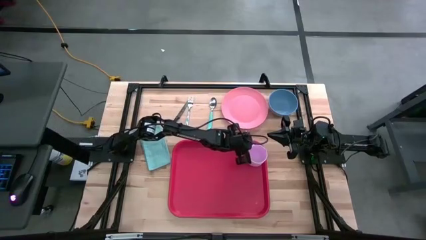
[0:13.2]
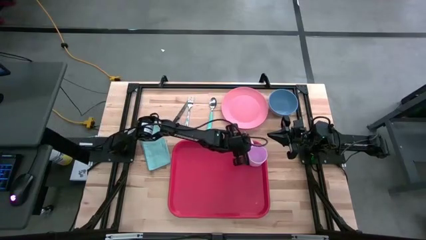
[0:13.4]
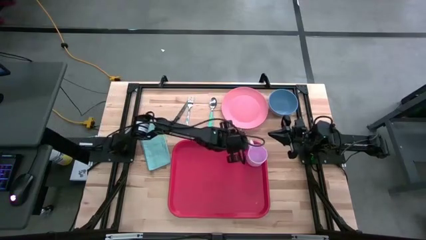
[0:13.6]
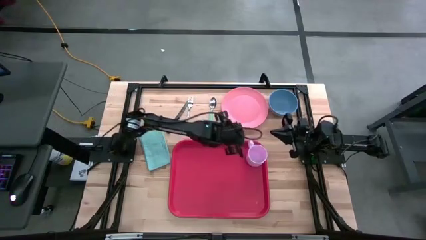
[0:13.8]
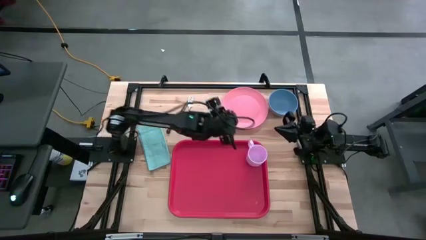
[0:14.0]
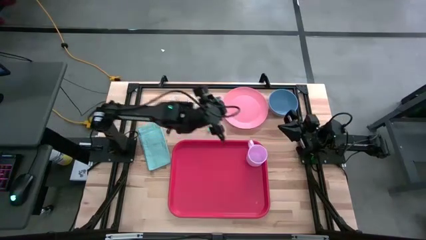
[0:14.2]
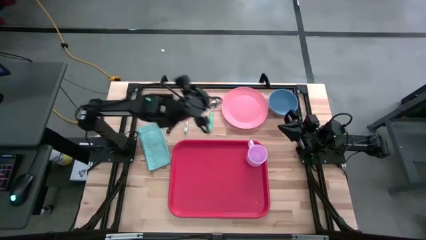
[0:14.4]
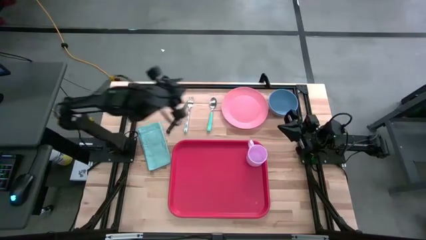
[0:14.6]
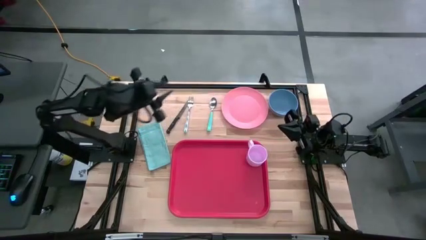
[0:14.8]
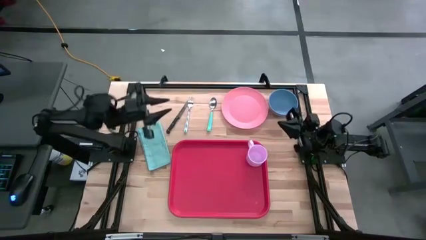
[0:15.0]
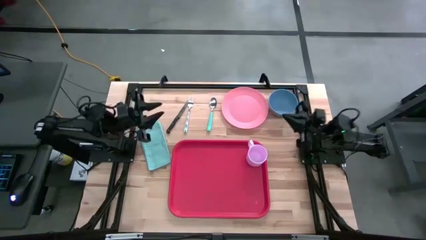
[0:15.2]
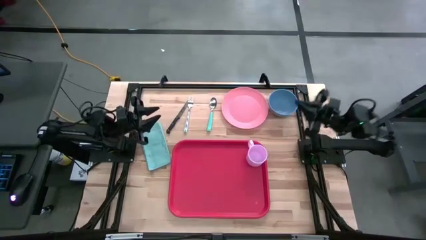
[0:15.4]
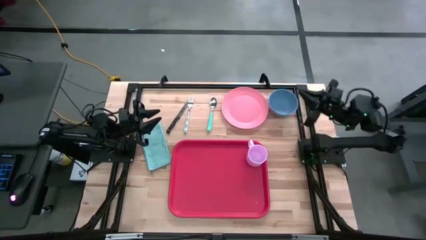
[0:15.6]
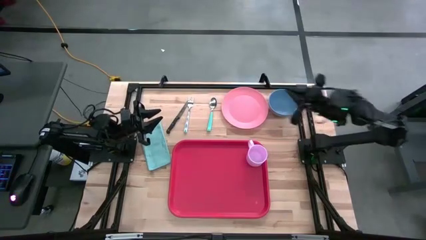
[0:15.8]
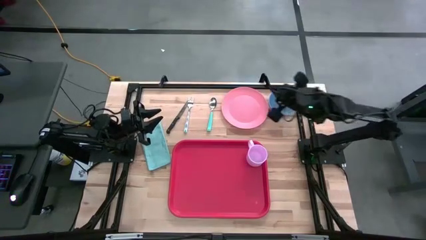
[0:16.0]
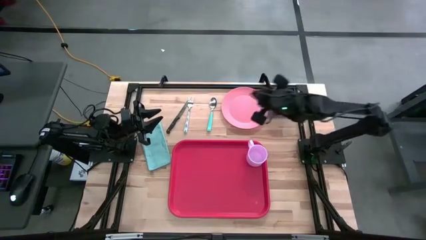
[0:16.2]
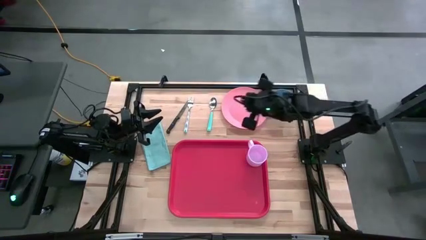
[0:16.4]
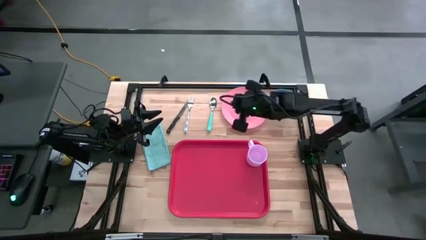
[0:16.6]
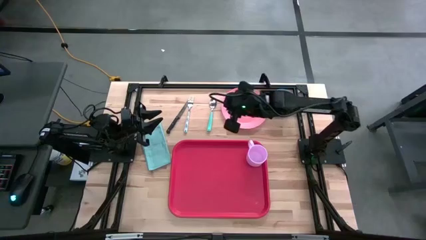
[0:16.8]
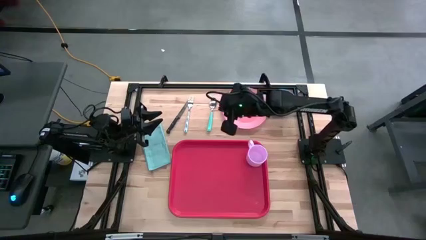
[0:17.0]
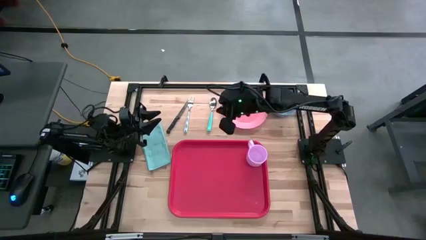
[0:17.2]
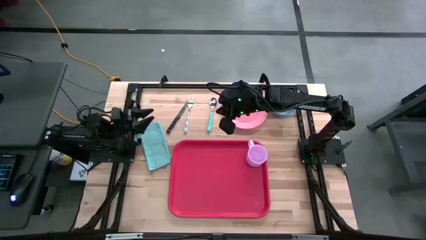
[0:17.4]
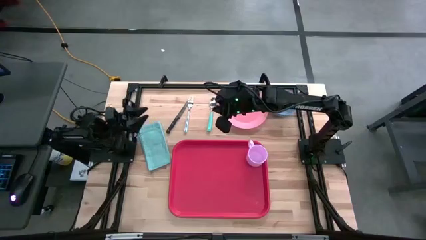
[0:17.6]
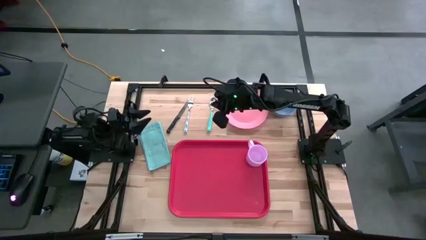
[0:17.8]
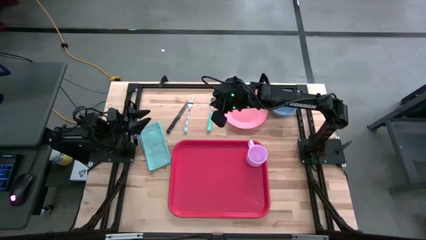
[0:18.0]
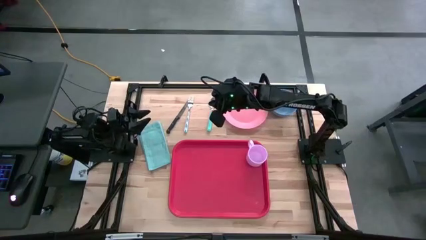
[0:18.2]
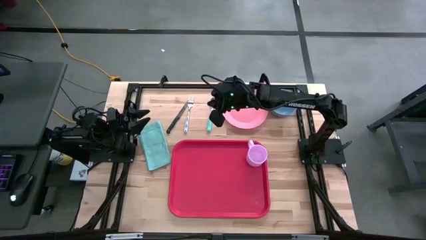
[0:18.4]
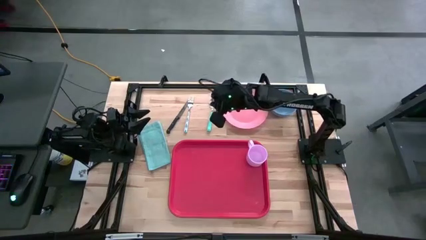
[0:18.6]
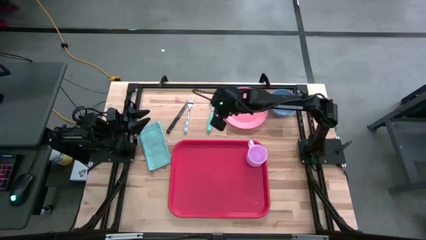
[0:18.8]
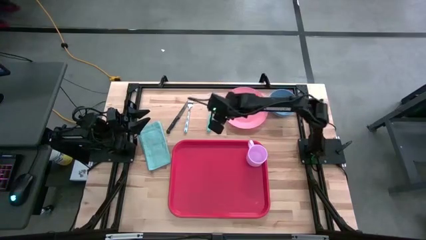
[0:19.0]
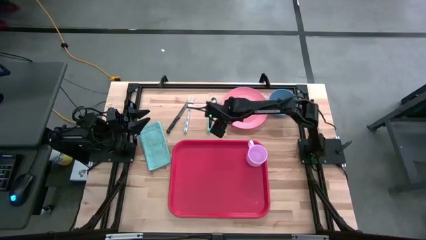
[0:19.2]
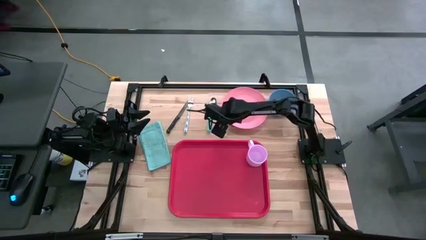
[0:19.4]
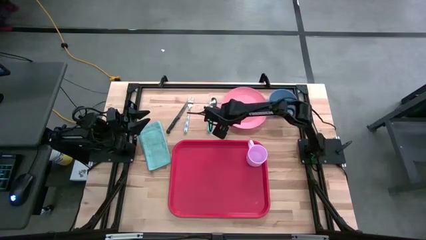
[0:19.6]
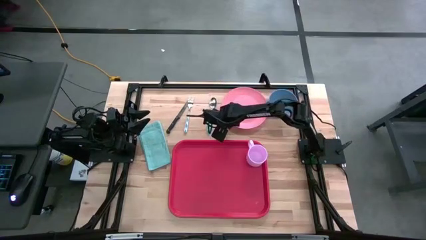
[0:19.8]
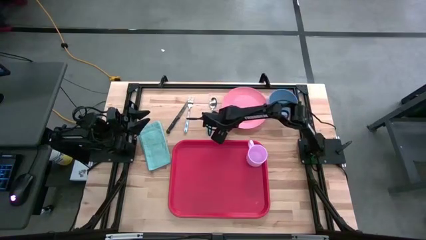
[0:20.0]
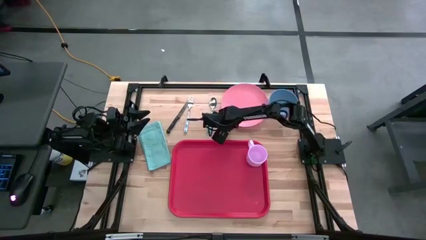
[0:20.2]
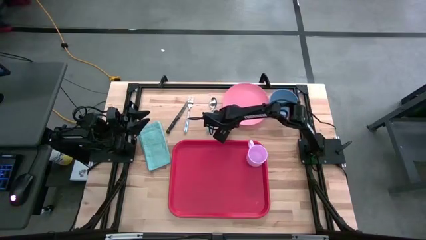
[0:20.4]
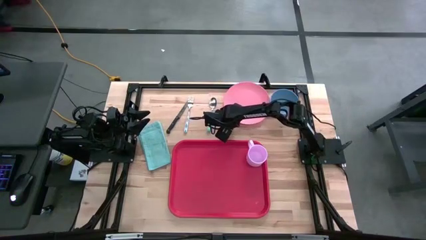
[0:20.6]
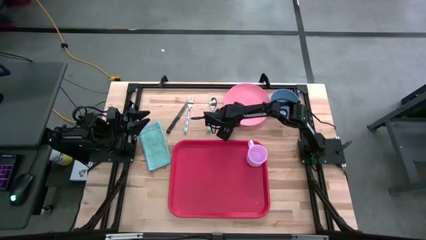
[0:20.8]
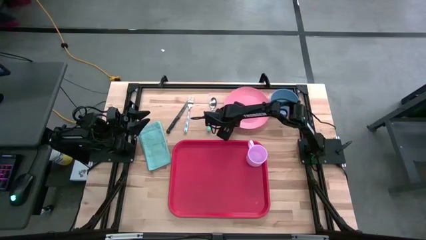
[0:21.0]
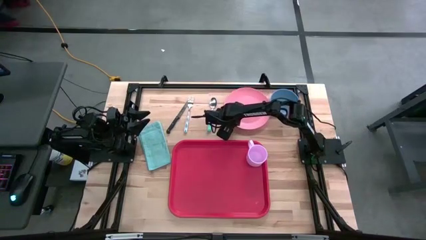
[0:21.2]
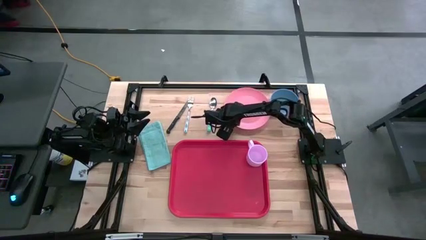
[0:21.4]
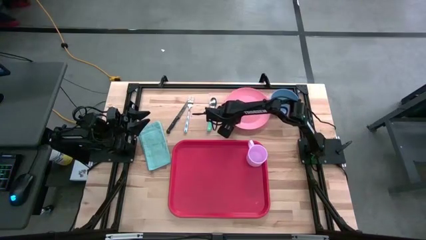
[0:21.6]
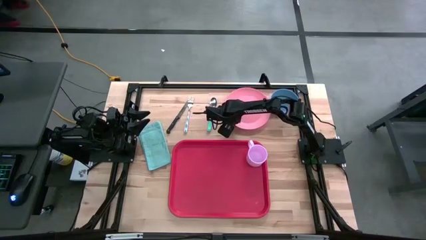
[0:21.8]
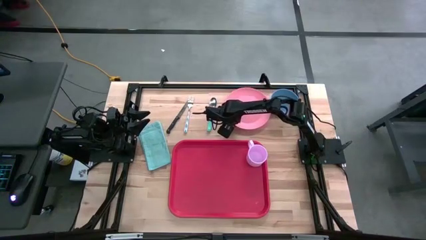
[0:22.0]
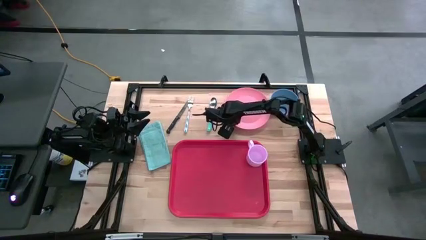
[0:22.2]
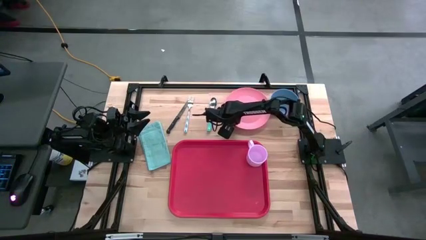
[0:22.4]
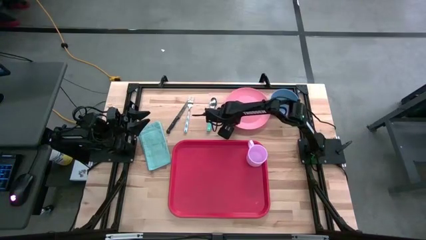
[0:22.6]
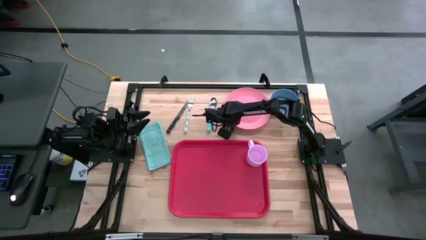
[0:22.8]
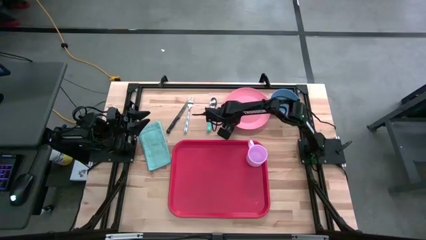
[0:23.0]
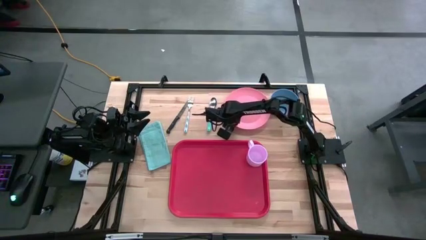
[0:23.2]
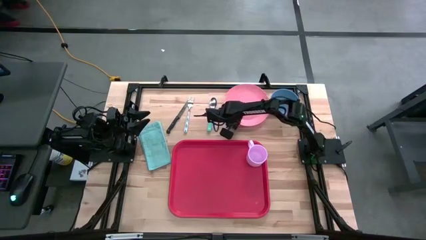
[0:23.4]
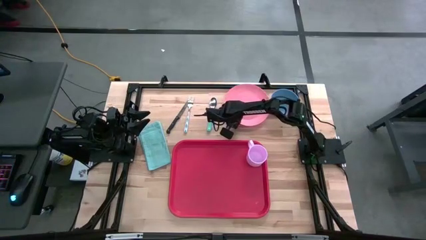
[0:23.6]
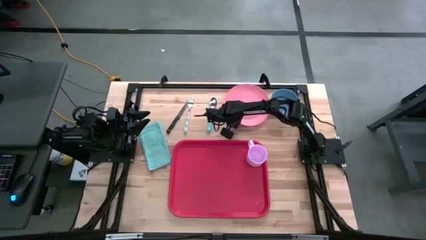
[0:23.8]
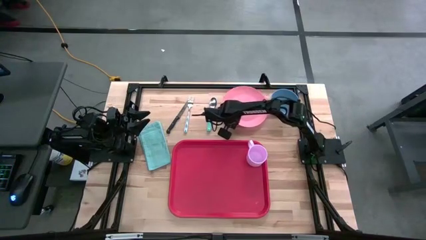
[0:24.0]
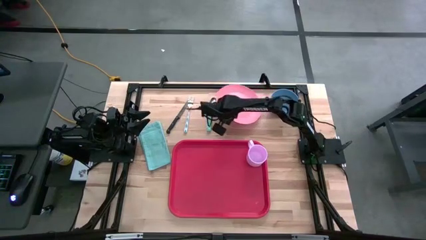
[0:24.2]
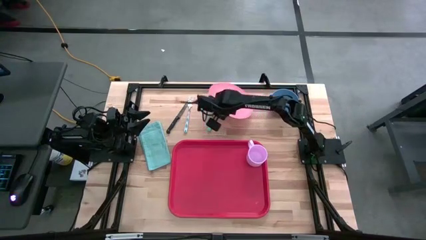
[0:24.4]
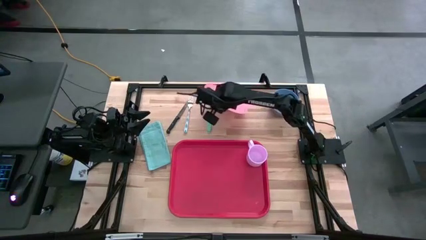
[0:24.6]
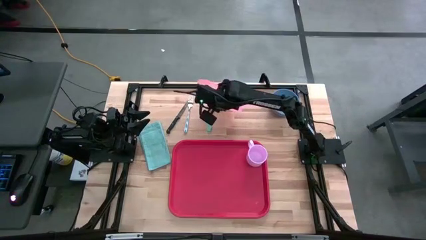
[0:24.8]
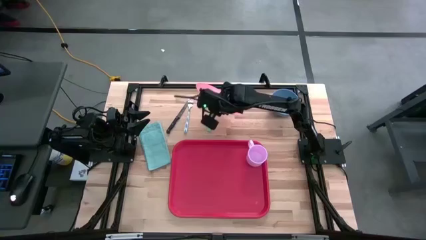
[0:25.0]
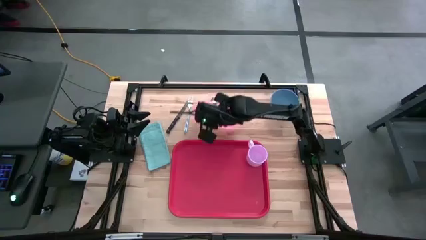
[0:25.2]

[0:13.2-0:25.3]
Task: Set up tray
Put the pink plate on the red tray to the bottom left of the purple mug

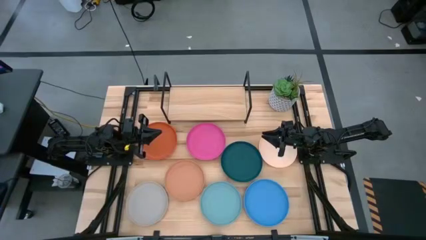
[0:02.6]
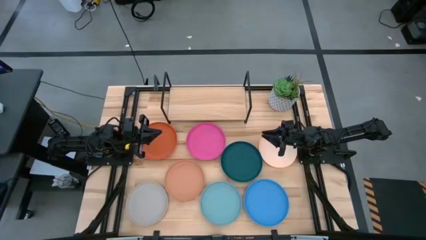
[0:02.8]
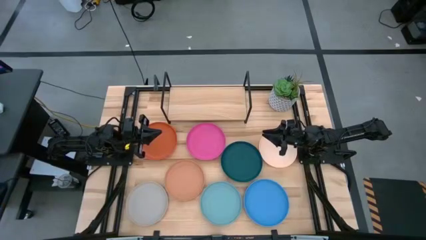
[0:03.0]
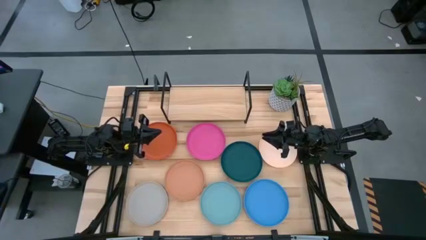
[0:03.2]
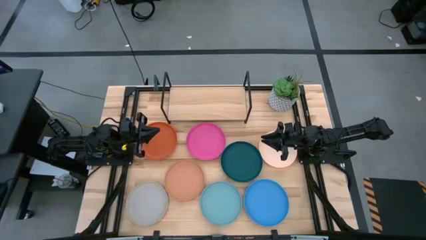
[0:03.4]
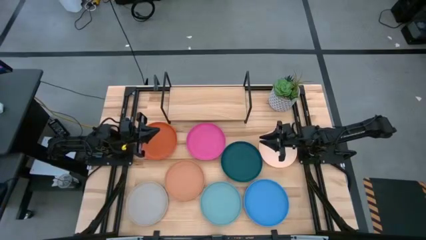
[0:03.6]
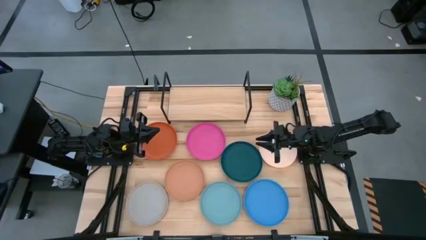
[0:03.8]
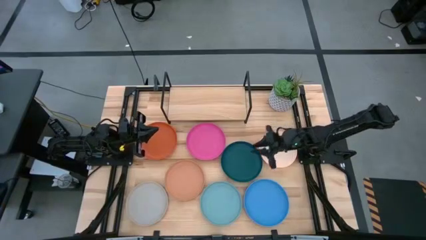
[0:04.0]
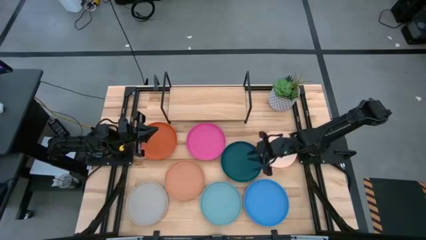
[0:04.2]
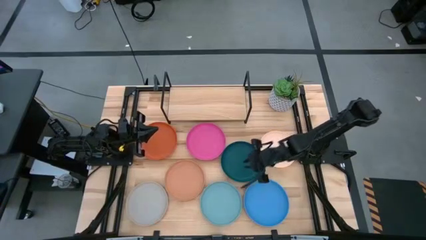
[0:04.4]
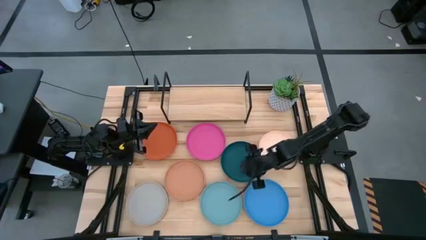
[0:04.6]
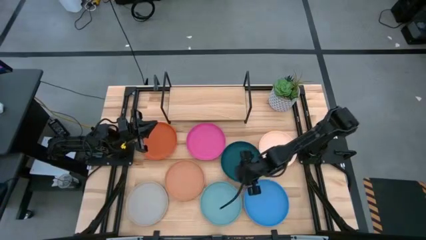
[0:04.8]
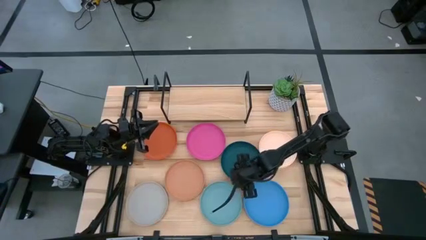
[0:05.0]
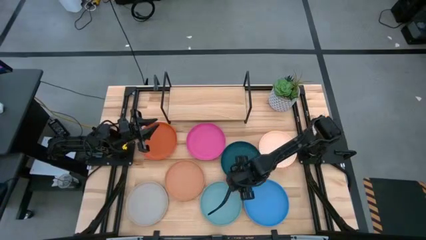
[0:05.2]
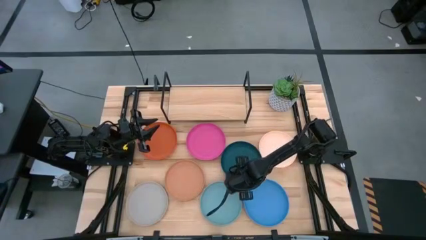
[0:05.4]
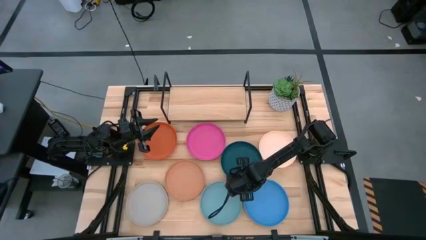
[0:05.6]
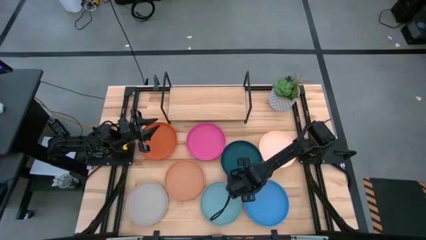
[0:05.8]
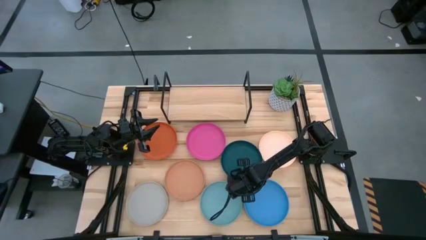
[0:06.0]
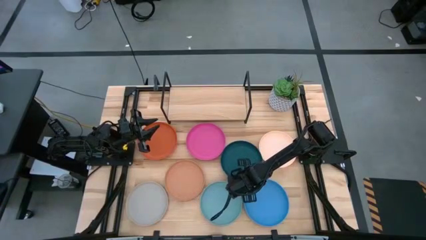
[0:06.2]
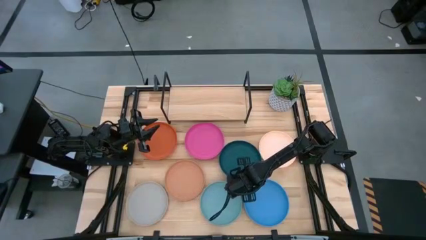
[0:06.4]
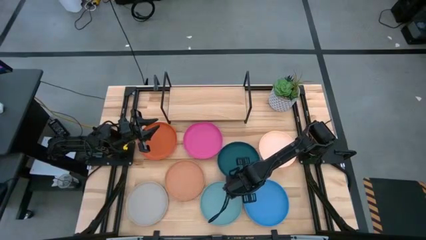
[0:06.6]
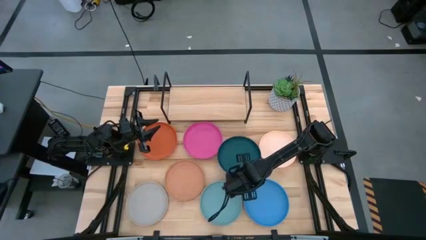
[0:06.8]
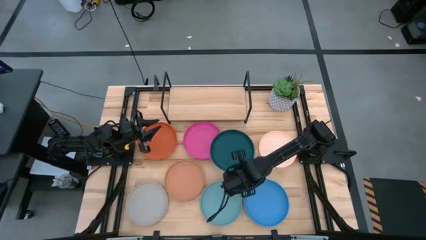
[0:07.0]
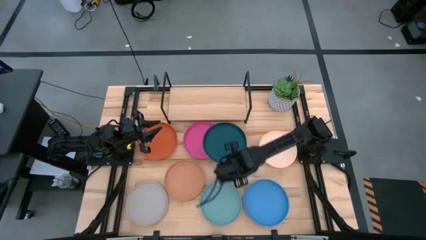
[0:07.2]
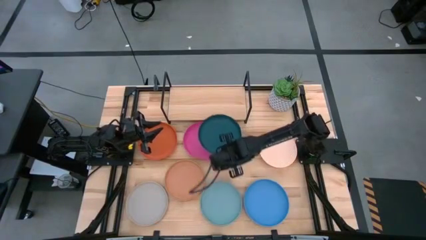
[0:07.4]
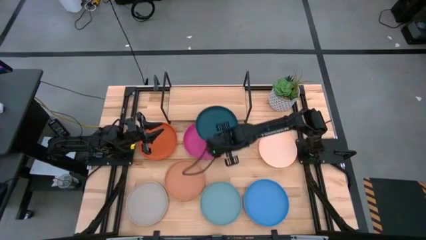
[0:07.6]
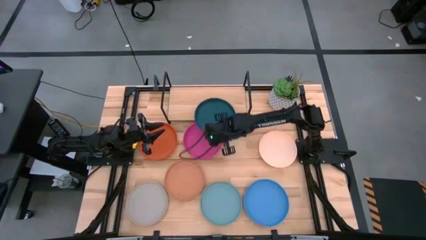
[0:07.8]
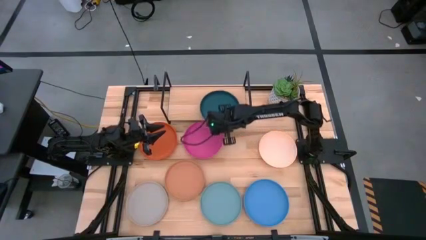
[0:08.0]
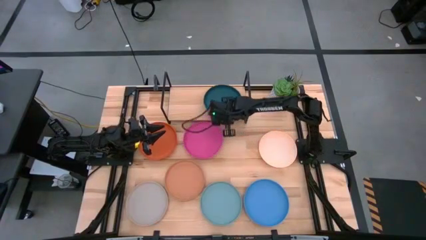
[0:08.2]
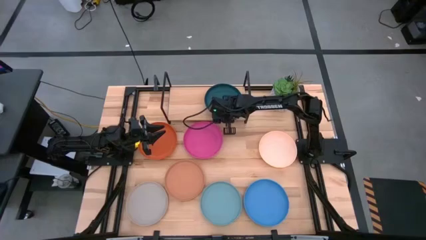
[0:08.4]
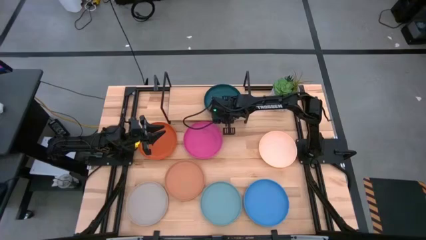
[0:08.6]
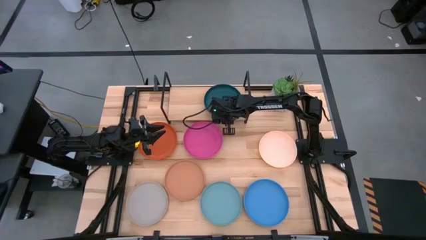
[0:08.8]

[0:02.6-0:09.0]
Task: Place and stack plates onto a shelf
Put the dark blue plate on the shelf
